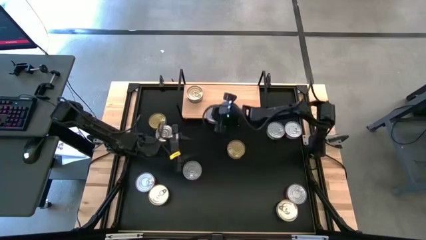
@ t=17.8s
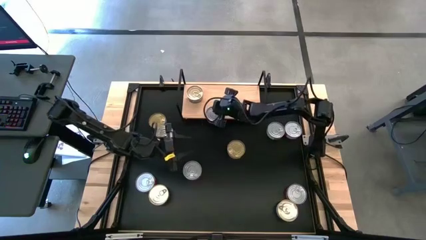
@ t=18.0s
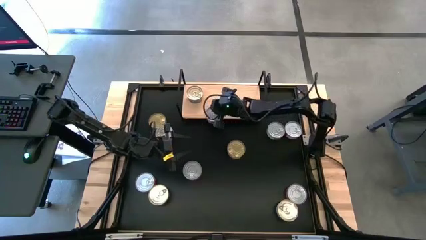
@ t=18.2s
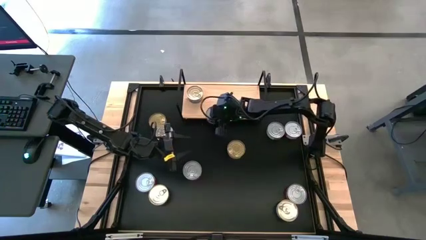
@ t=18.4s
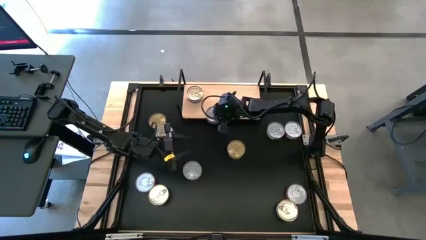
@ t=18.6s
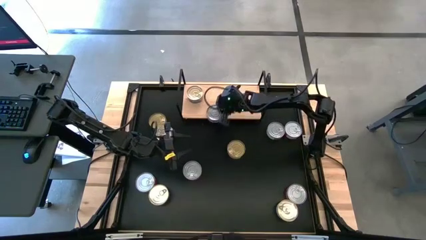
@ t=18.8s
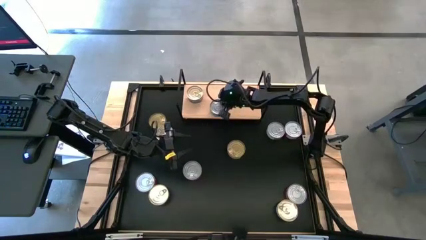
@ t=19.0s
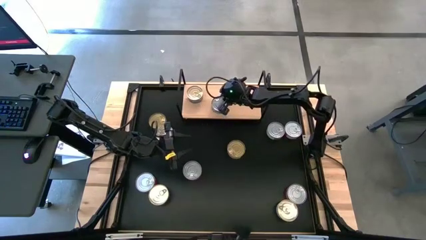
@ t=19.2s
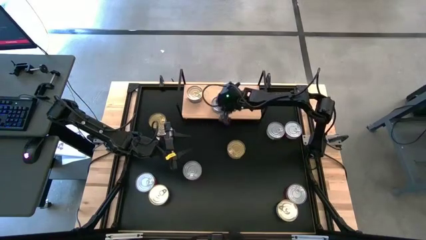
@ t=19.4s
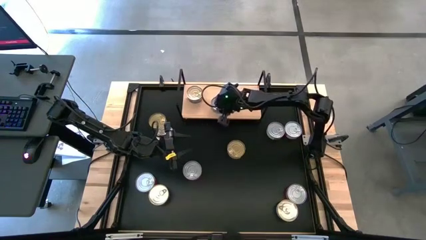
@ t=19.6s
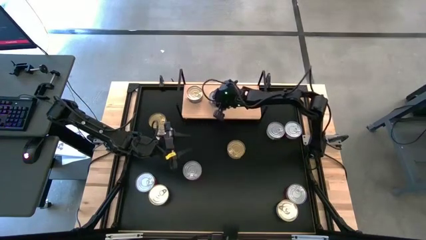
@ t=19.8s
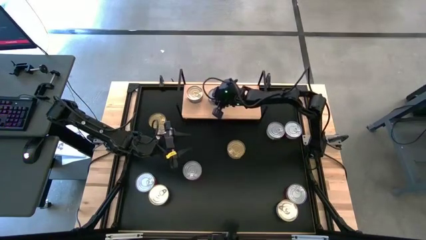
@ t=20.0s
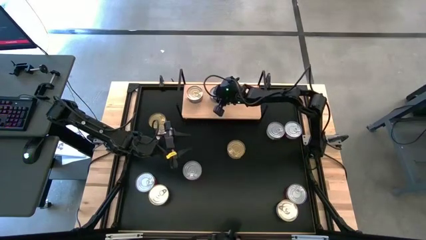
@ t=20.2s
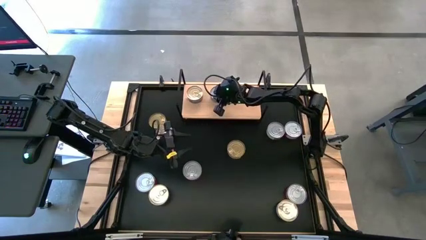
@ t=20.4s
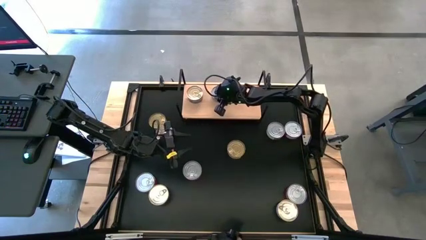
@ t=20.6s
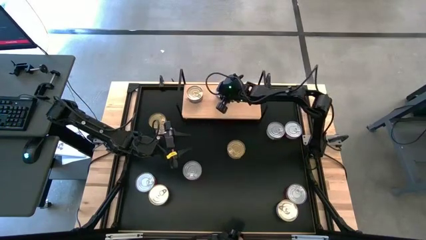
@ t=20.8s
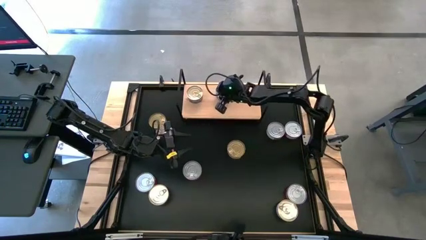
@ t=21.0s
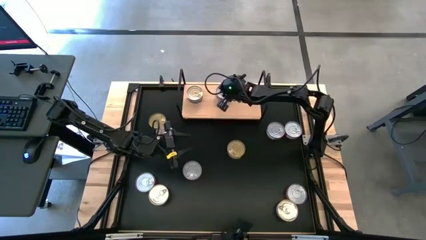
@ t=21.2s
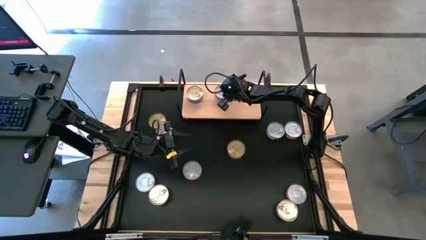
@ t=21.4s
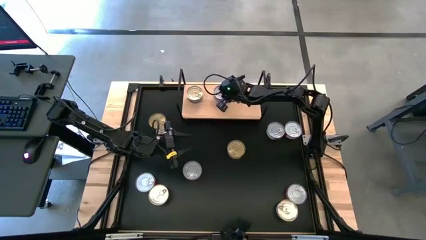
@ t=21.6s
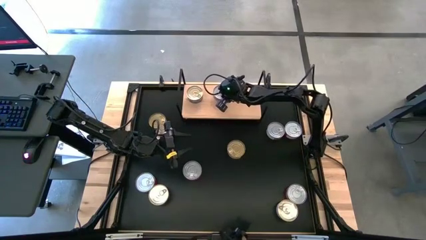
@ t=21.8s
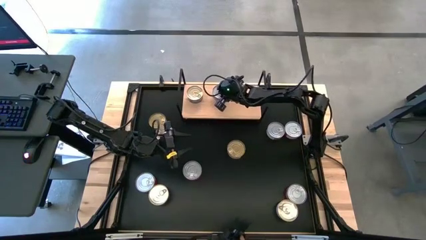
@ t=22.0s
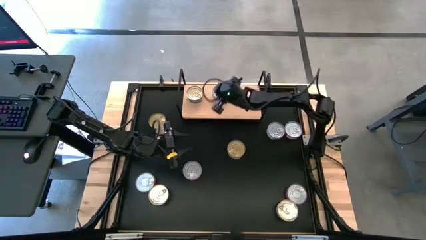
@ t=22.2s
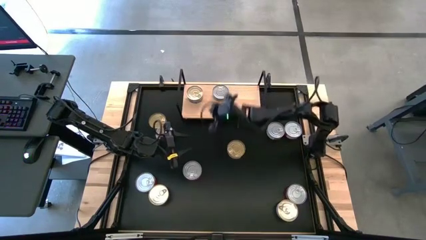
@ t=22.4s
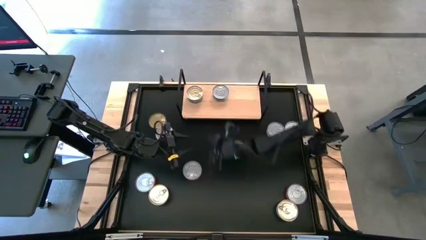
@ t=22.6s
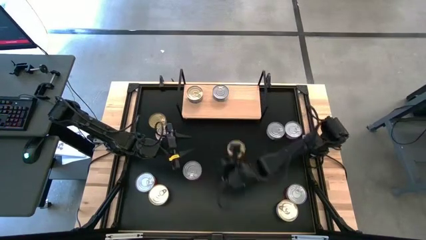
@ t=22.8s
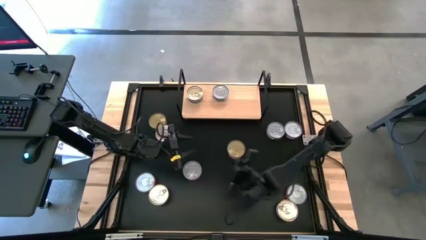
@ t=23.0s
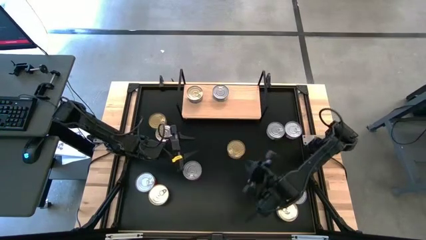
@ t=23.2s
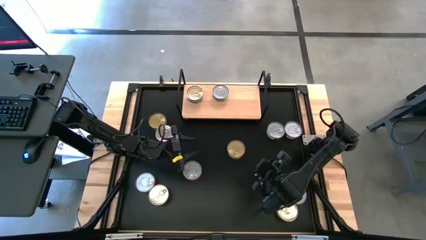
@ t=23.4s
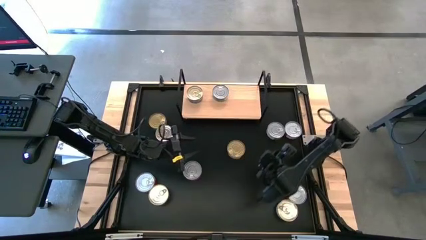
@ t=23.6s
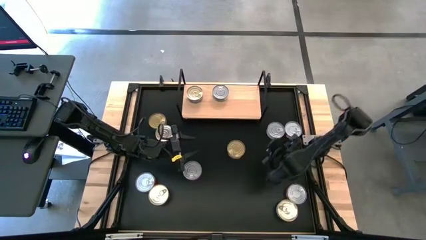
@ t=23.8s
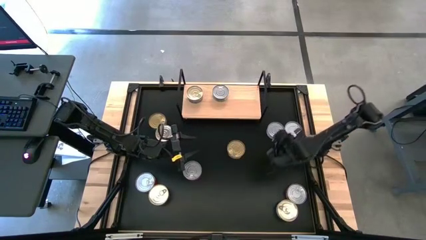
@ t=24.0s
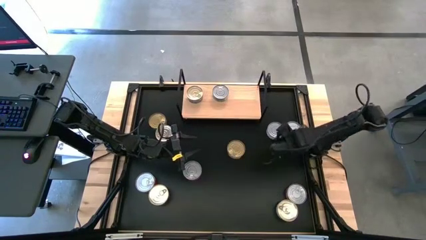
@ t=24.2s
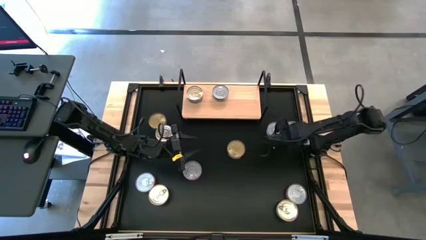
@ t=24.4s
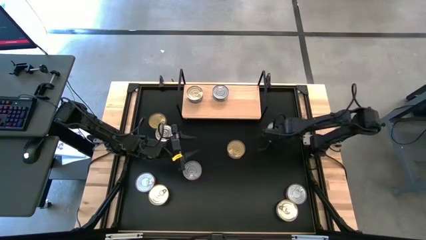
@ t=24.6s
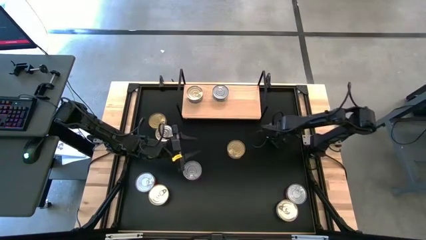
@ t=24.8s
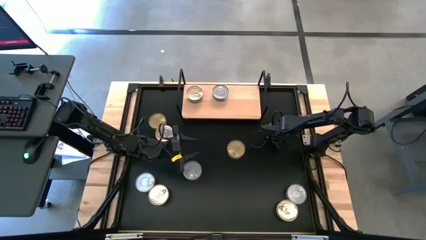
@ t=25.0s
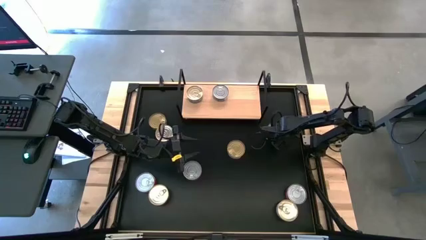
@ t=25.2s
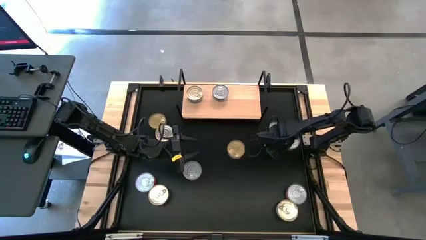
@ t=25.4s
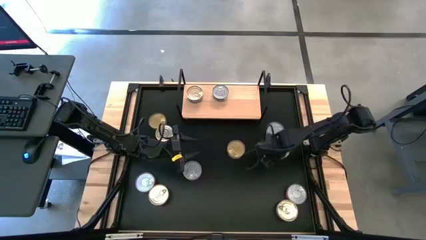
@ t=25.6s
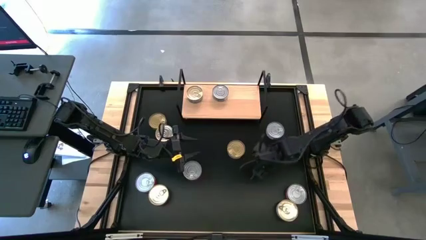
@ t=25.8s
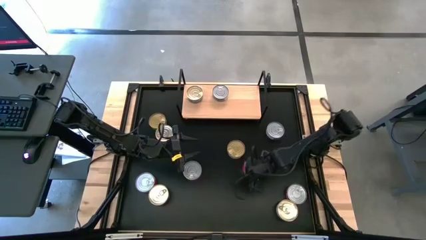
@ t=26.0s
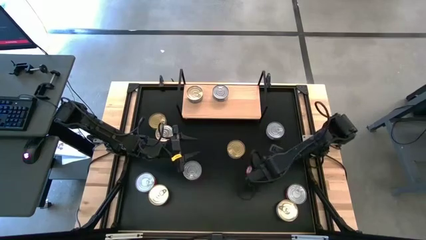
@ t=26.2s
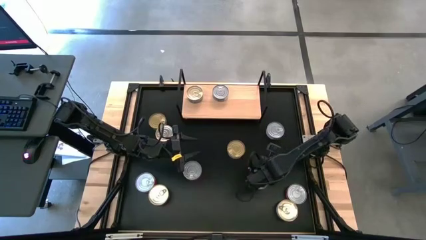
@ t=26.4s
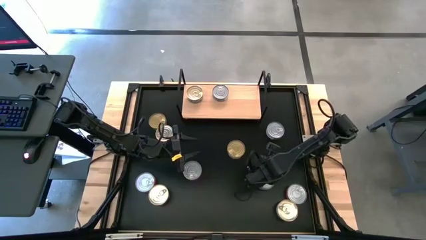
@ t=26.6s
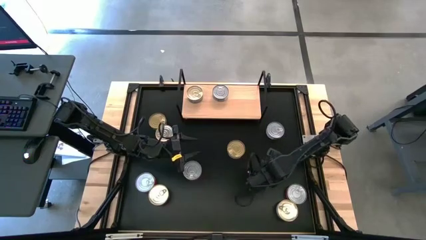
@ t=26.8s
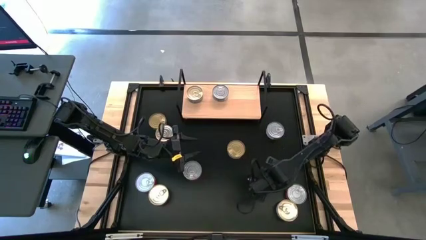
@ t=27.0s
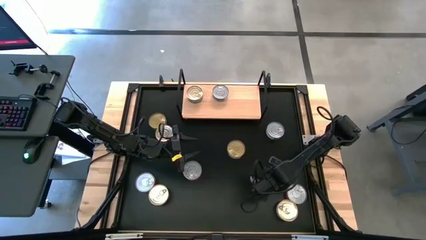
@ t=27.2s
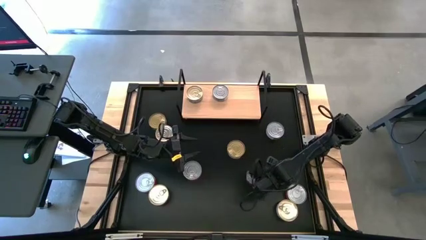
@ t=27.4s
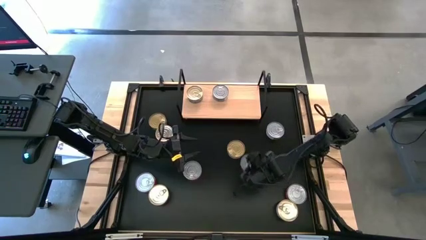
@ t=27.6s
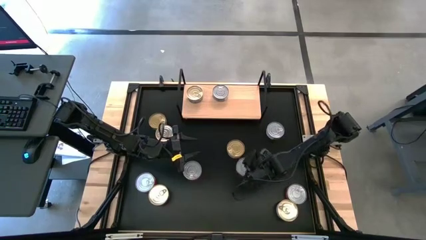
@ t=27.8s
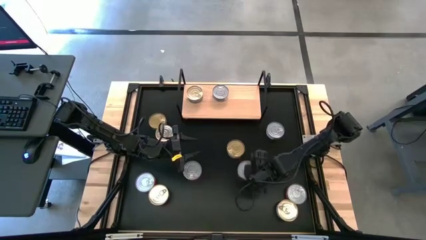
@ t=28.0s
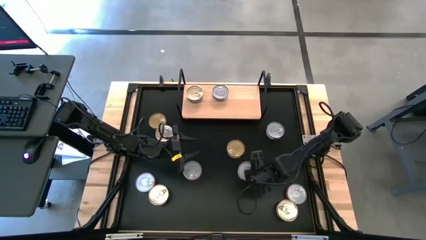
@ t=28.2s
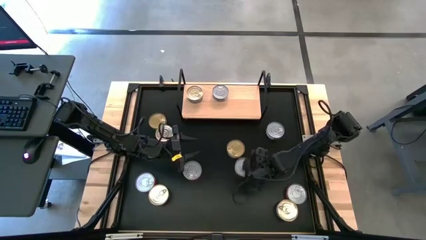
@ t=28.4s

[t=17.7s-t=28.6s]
Task: Stack canned seafood by type on shelf
Put the top right red canned tuna on the shelf
